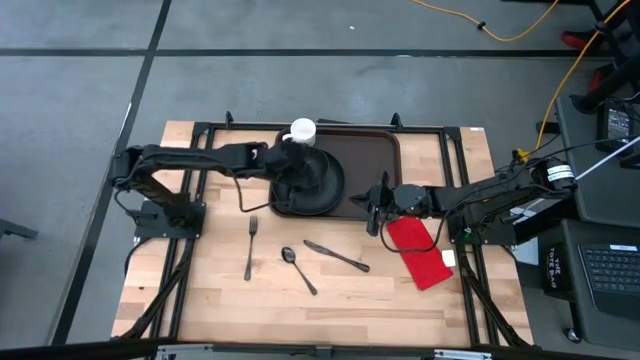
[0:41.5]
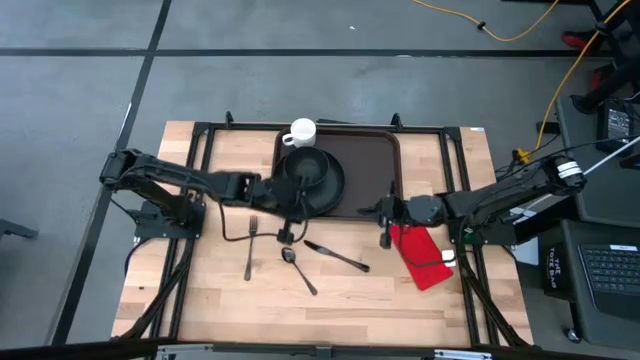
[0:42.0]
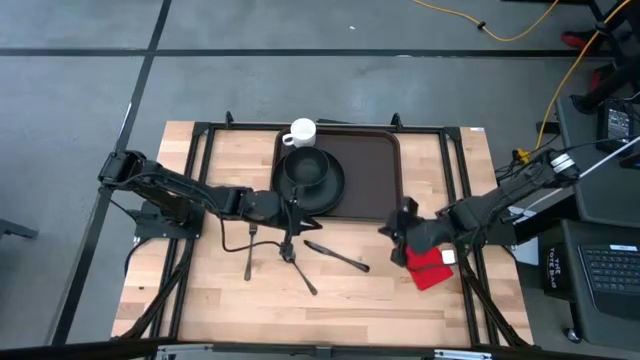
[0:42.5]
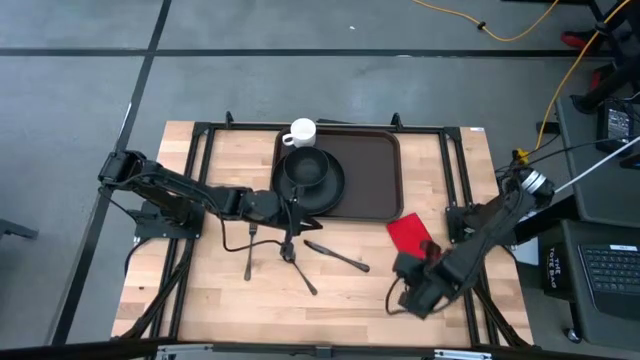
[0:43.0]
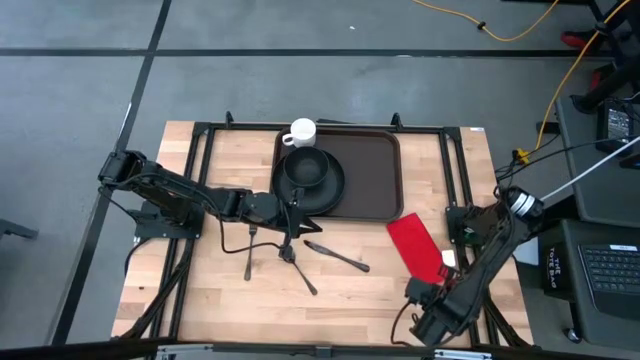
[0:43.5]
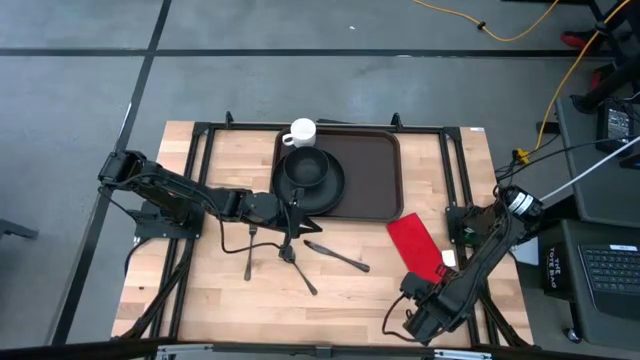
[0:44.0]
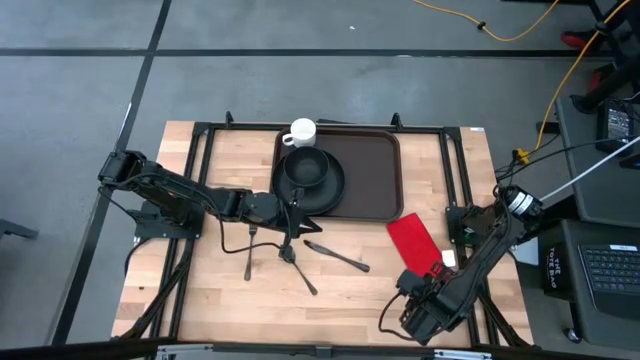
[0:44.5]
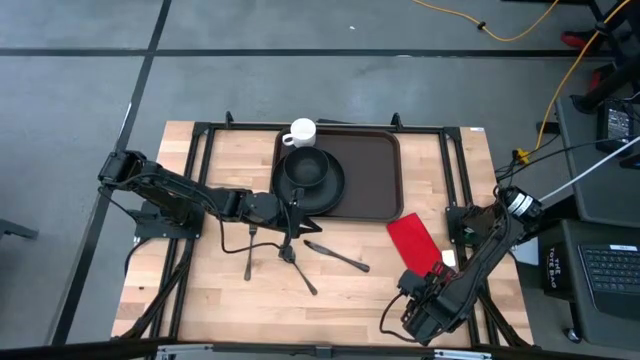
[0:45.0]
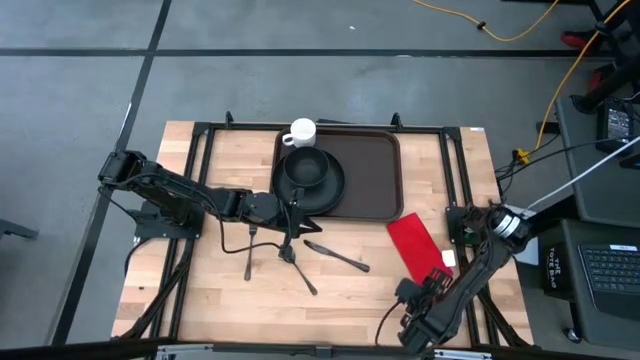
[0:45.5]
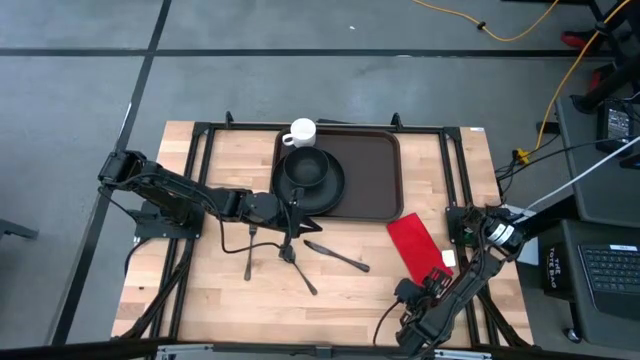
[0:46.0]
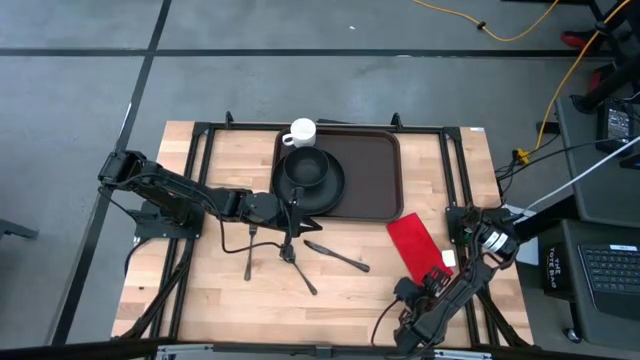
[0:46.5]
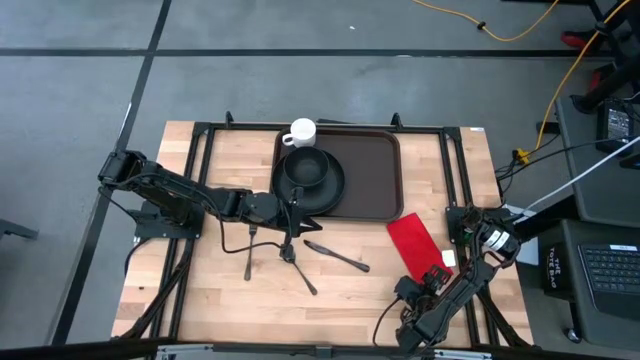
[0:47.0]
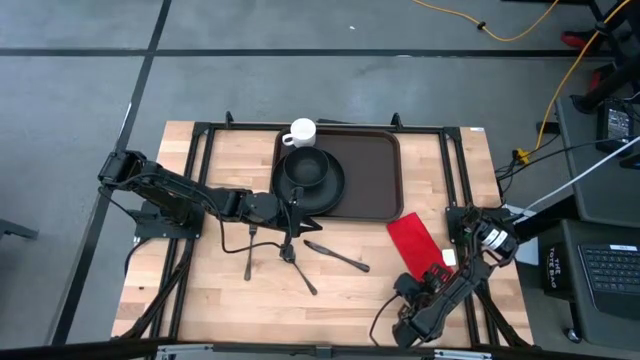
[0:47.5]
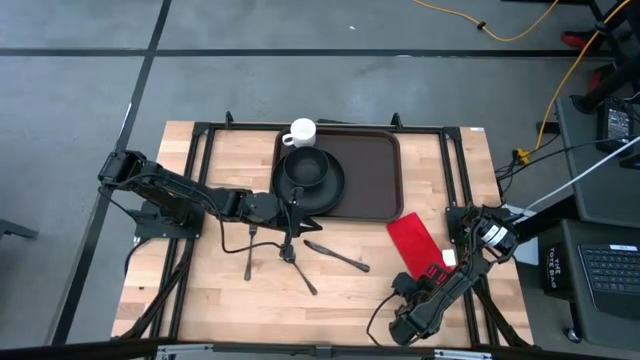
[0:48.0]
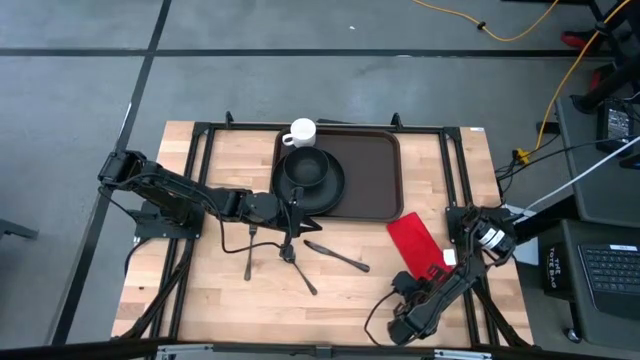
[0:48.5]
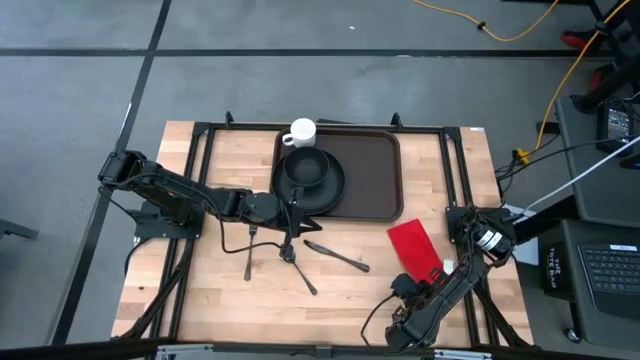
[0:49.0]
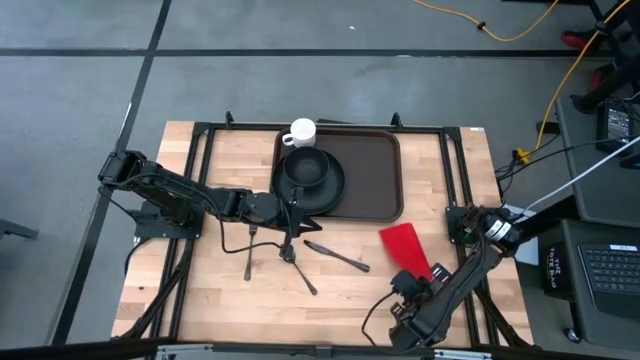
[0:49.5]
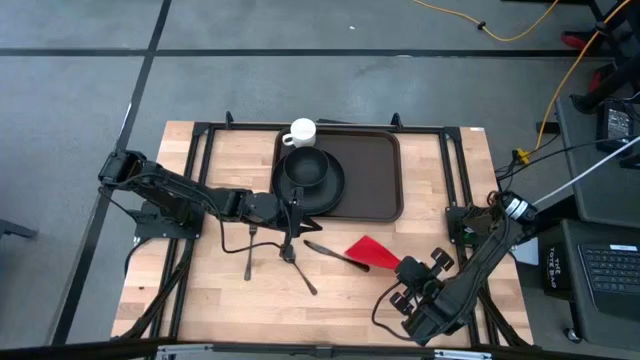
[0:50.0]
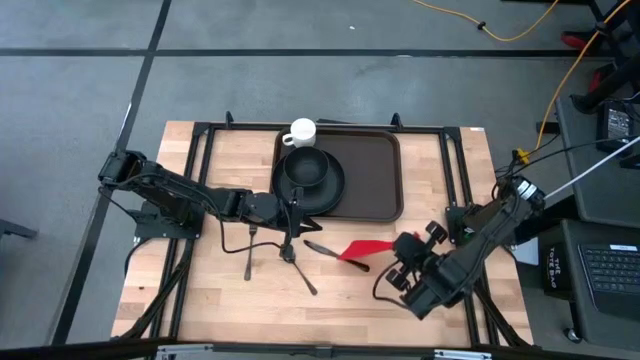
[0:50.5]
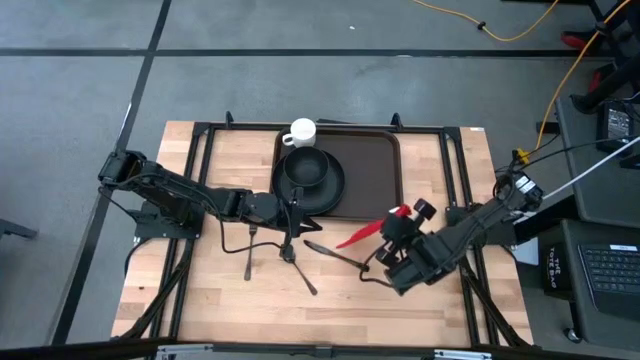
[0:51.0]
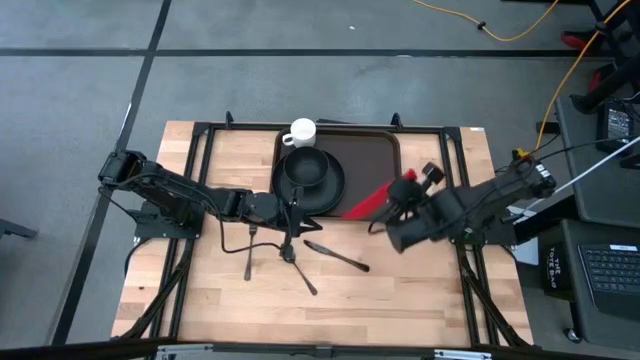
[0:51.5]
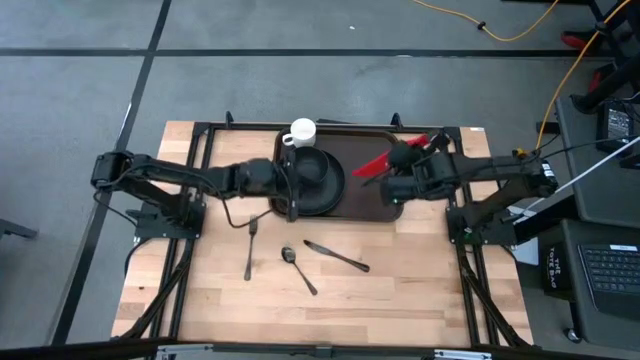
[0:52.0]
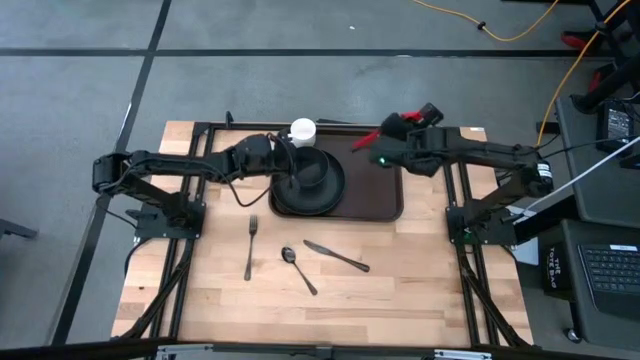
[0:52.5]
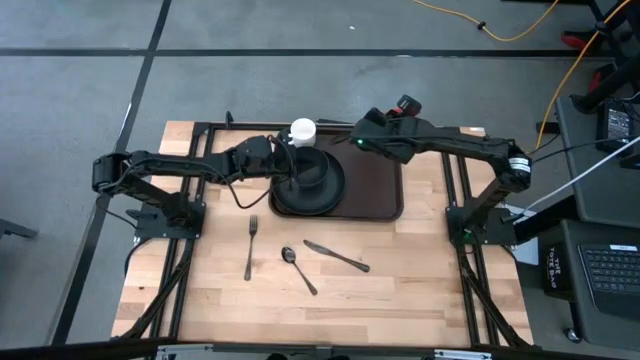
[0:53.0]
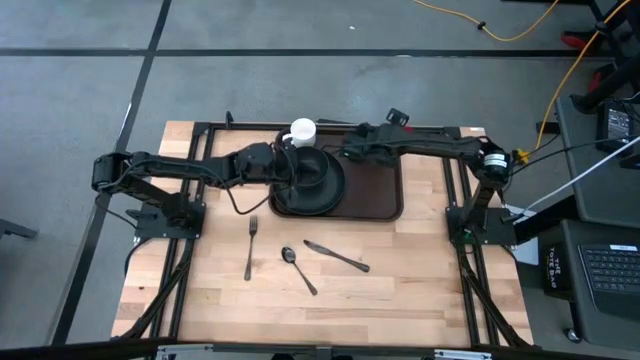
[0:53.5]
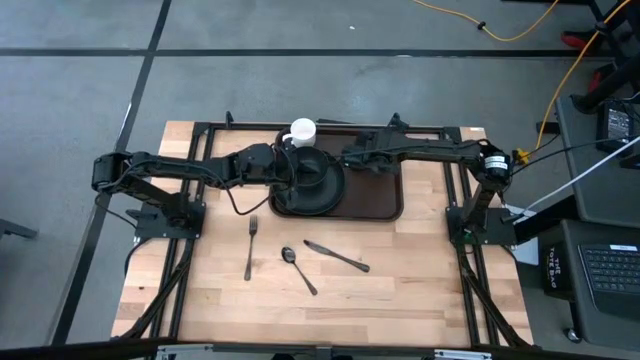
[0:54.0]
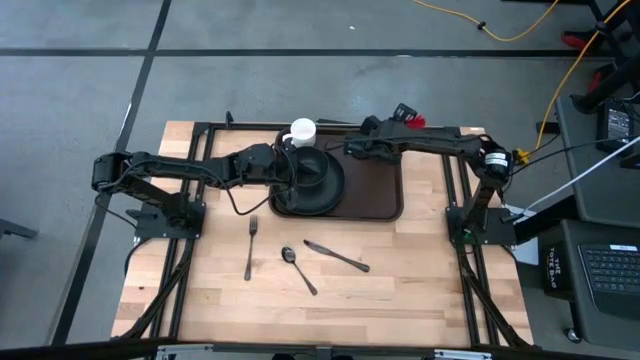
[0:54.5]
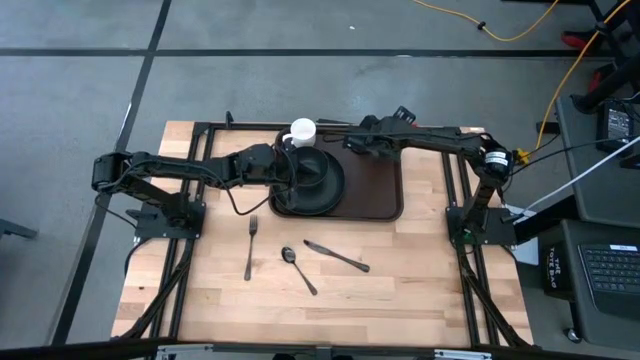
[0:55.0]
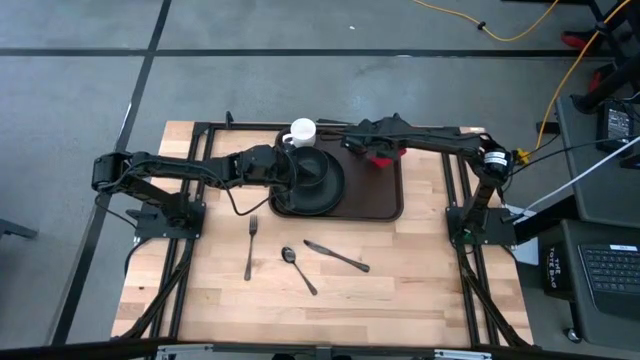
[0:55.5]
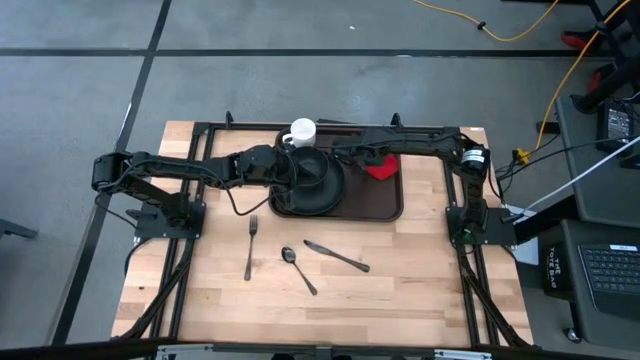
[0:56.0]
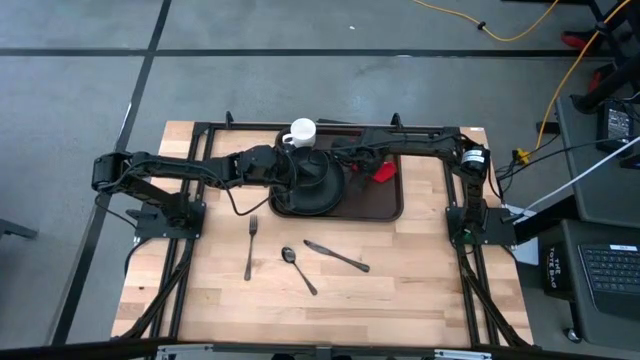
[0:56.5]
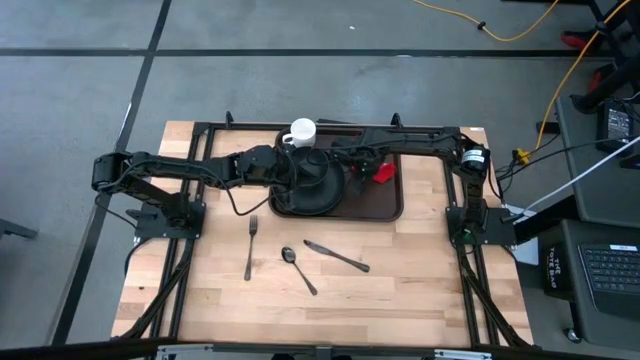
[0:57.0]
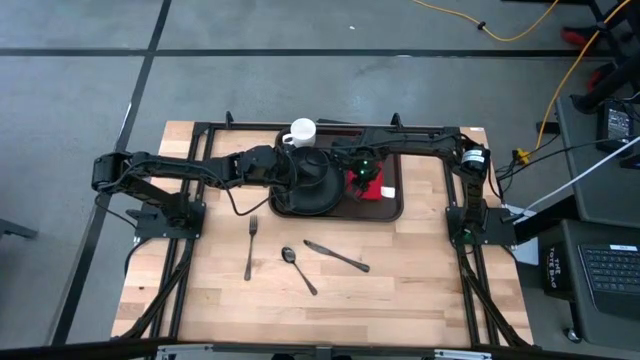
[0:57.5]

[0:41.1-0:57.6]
Task: Set up tray
Put the red table napkin on the brown serving tray to the right of the black plate
